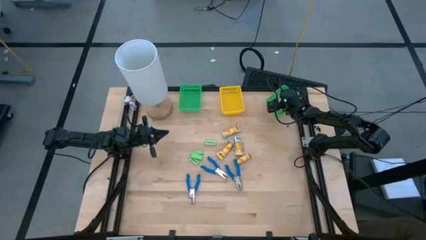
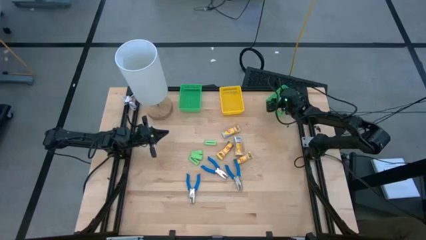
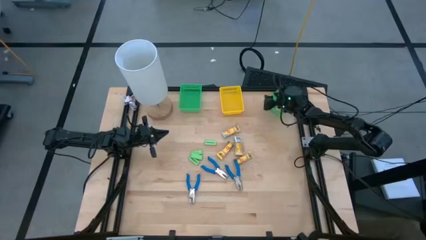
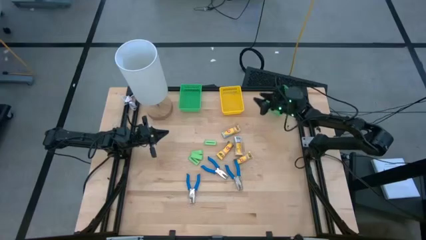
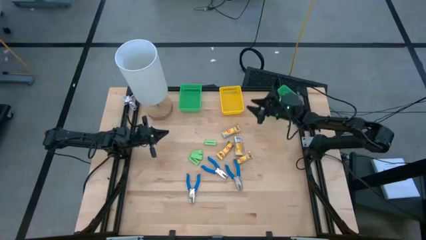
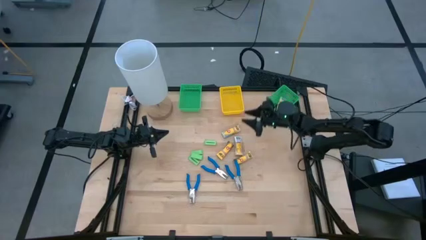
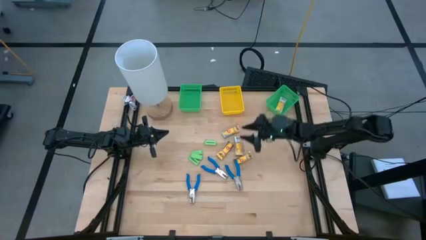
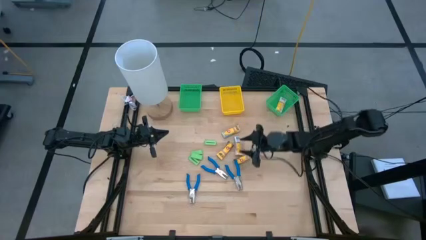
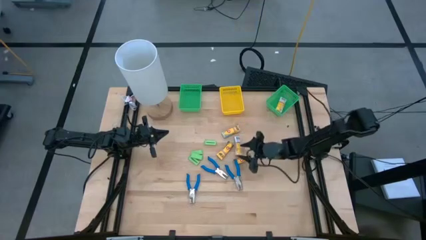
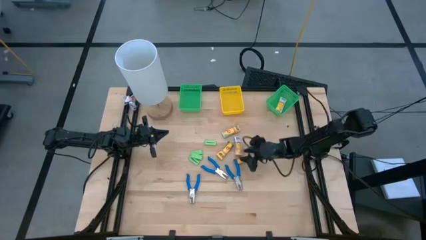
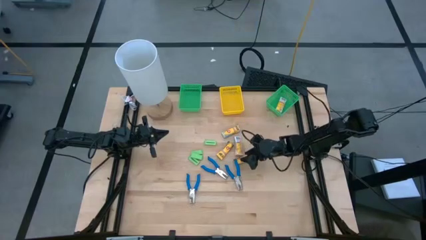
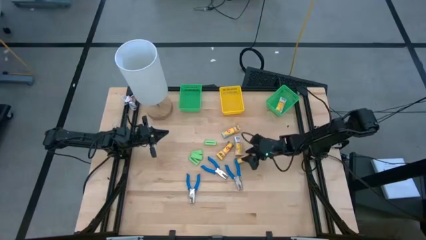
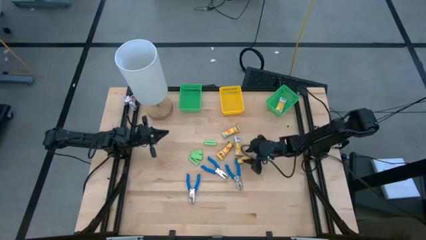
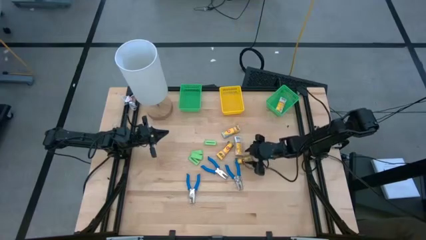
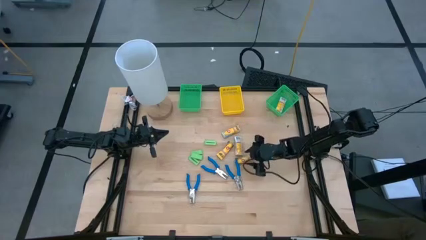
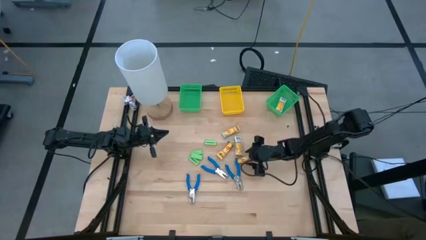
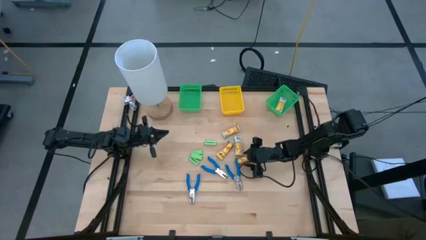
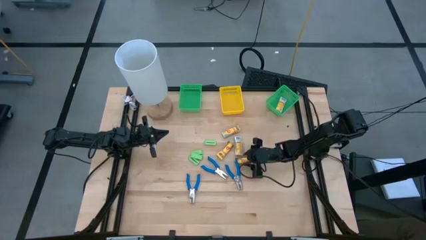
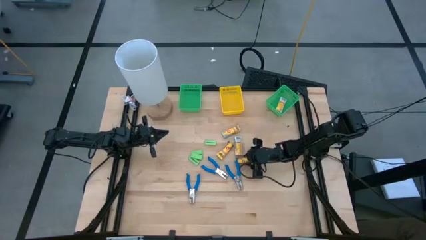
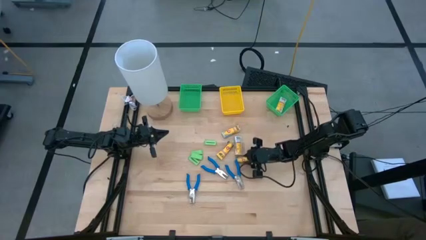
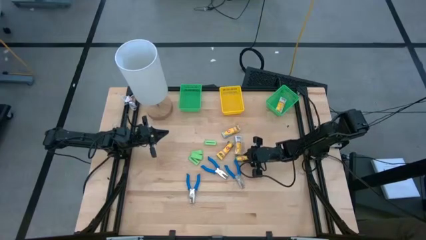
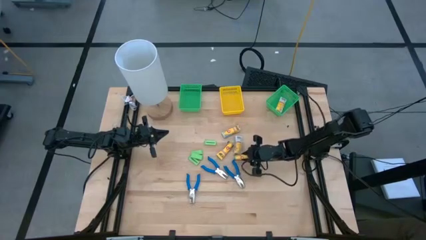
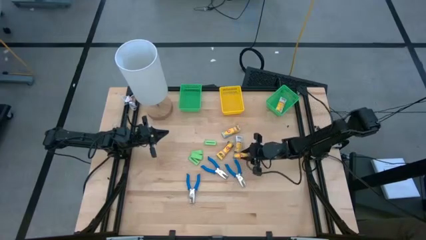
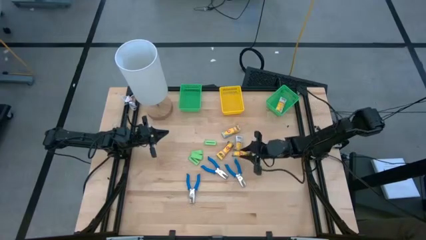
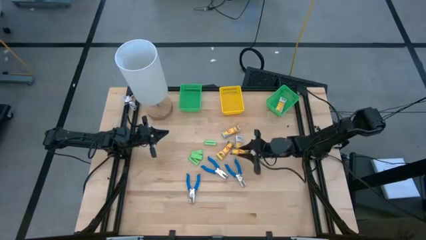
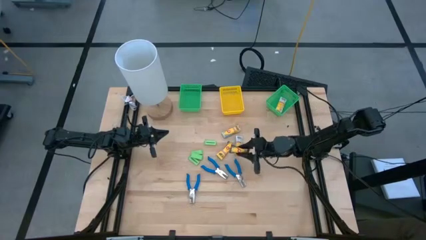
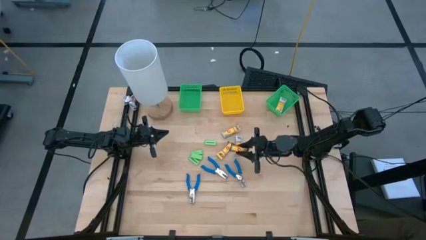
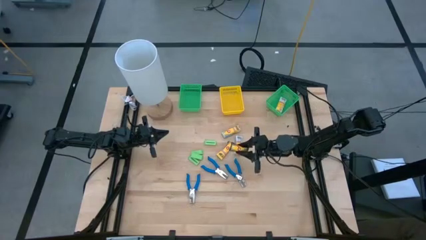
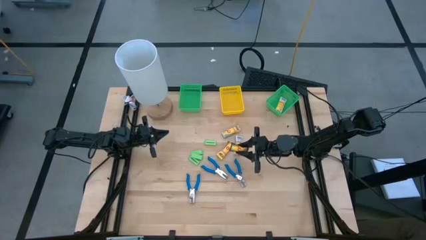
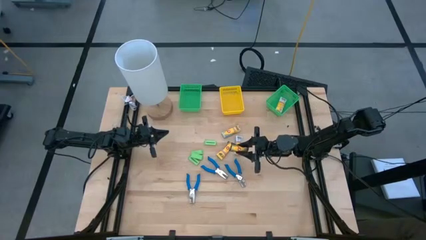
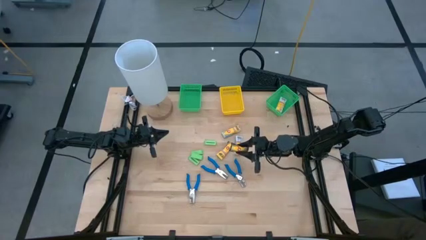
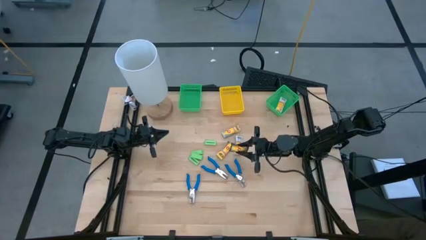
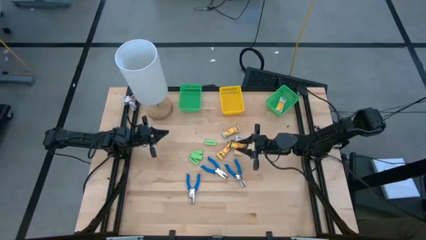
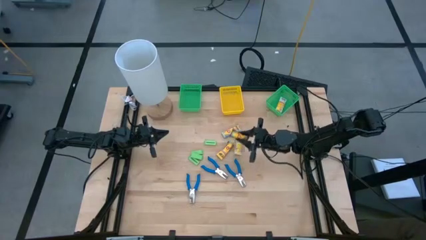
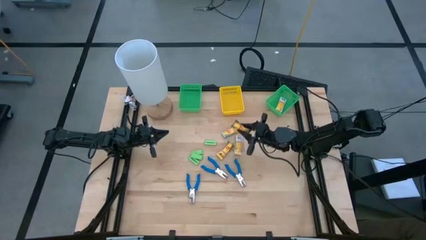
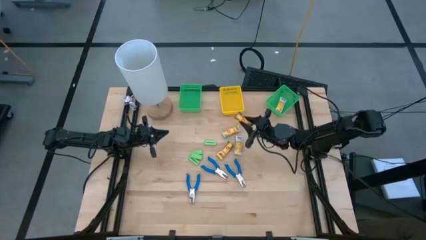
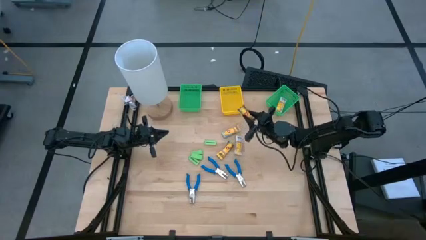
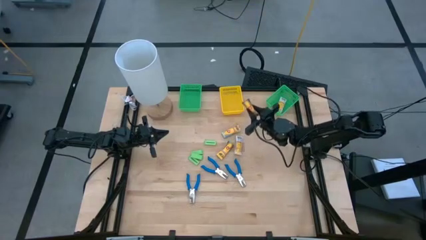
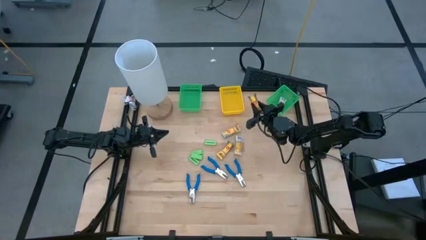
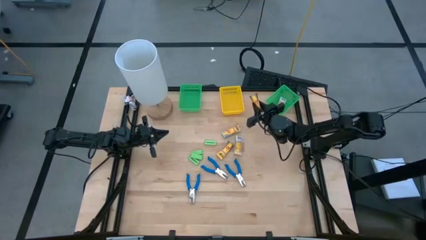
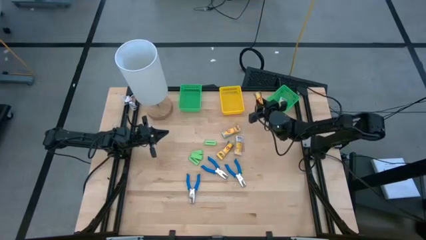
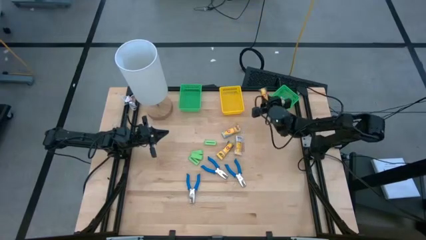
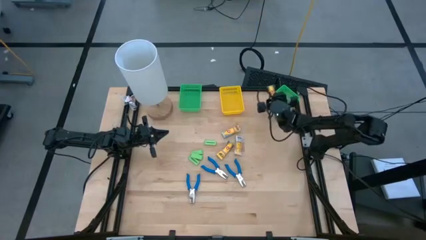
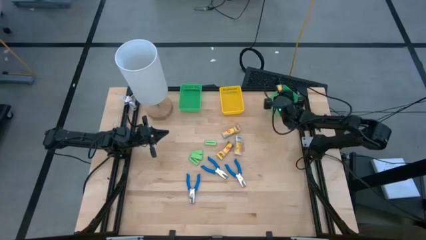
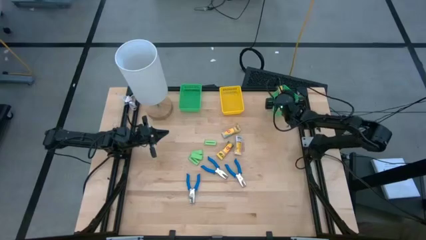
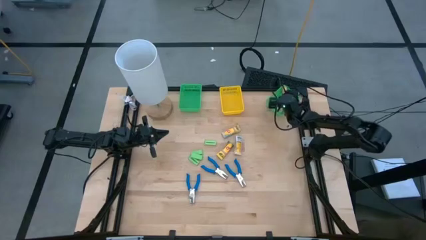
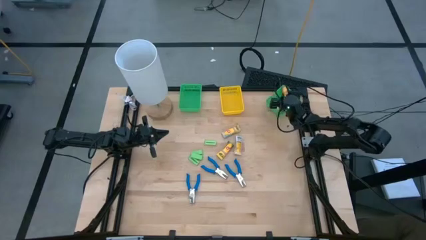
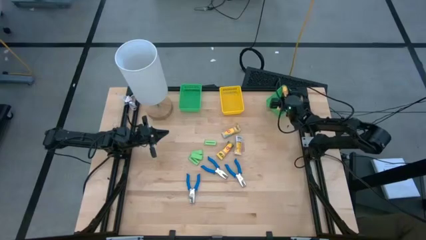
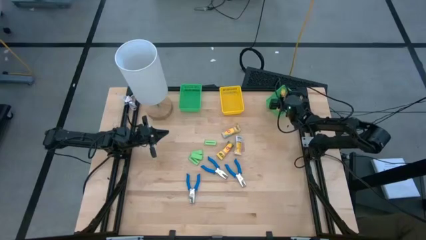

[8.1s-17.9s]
Task: Pick & Place School Supplies
Put the yellow crayon box into the right green bin

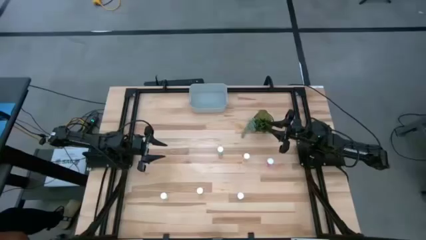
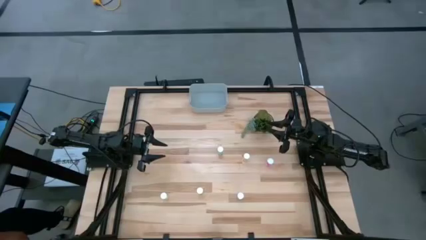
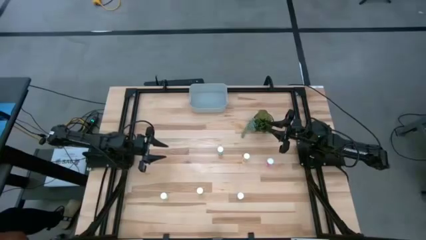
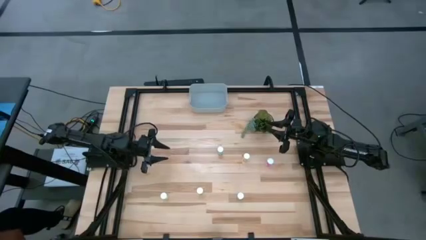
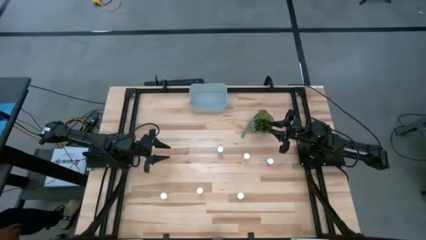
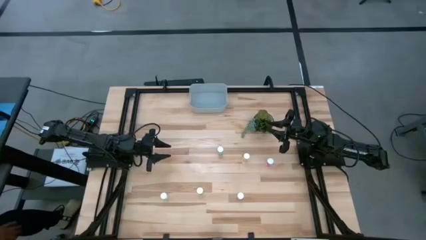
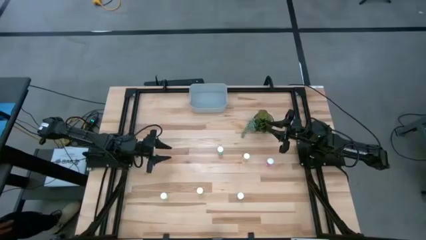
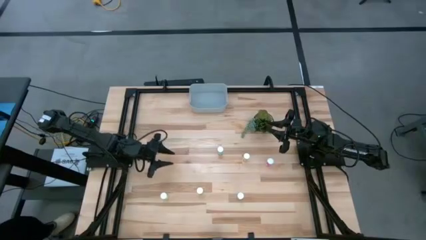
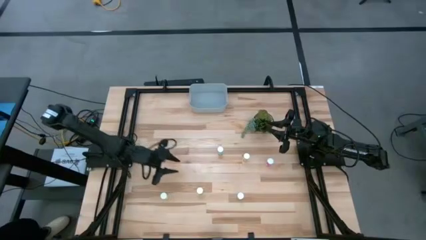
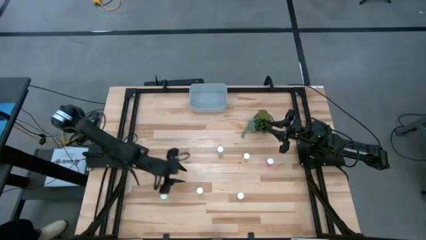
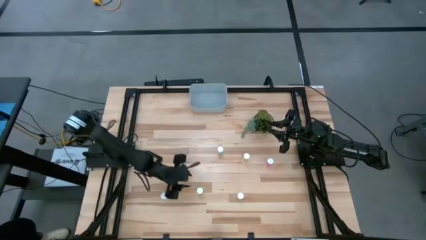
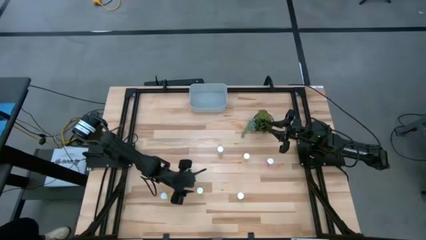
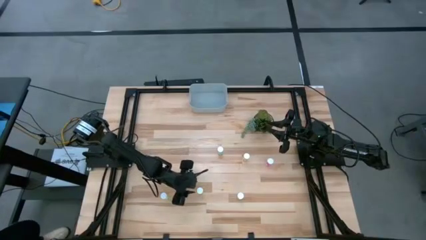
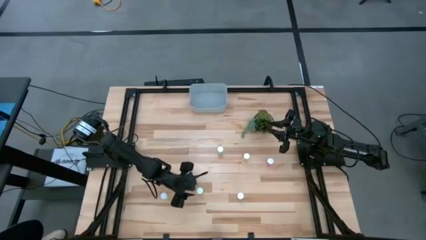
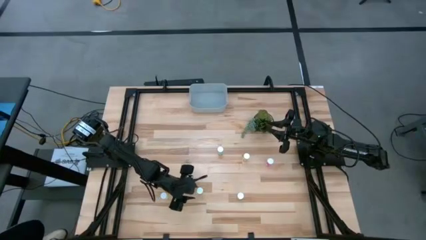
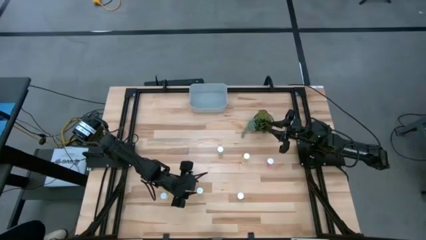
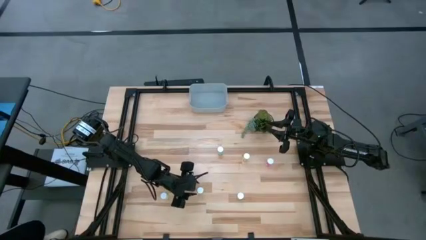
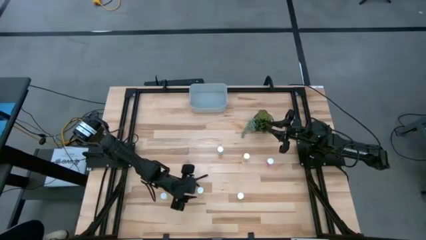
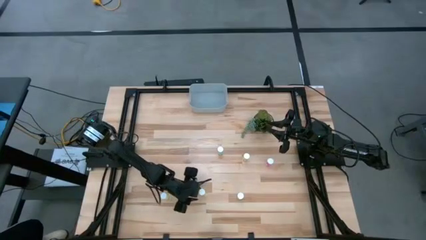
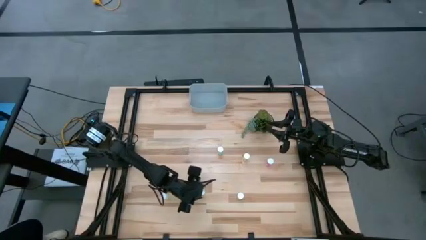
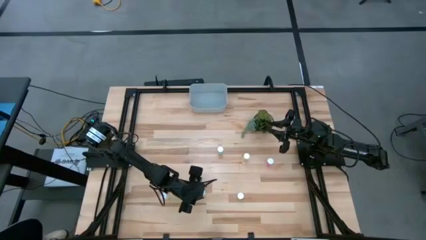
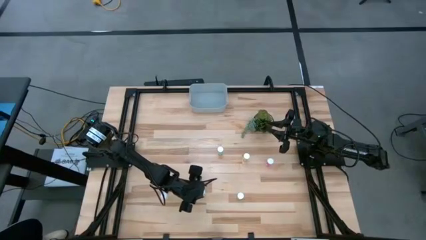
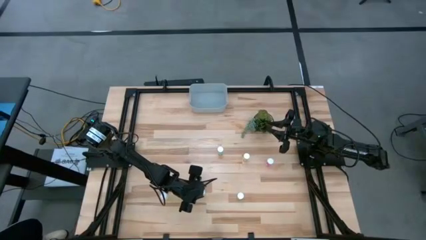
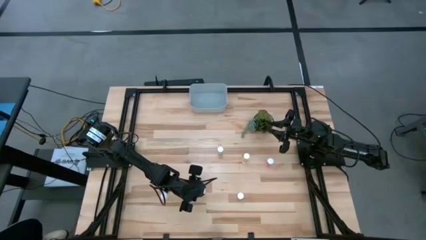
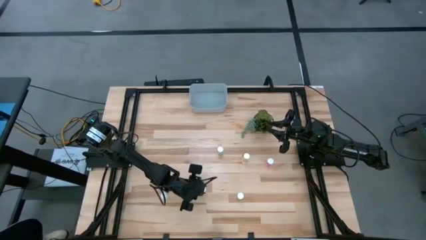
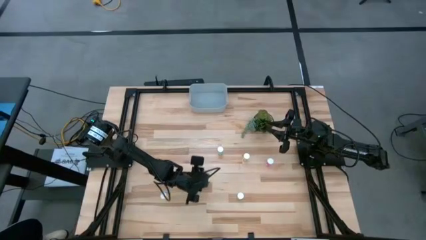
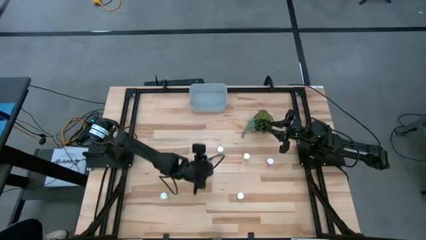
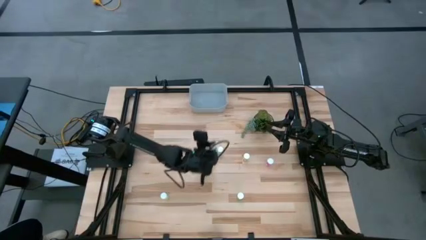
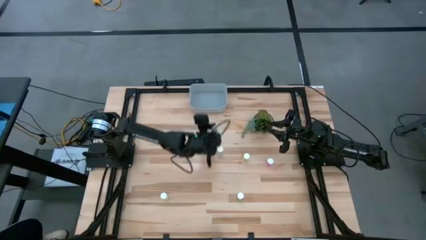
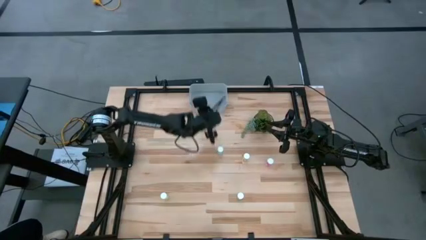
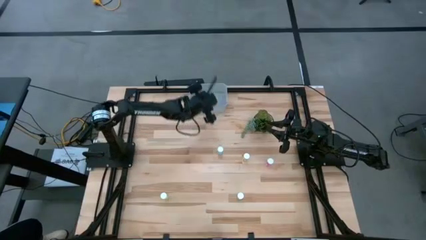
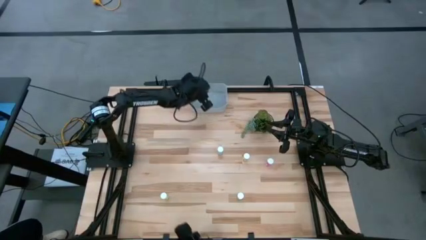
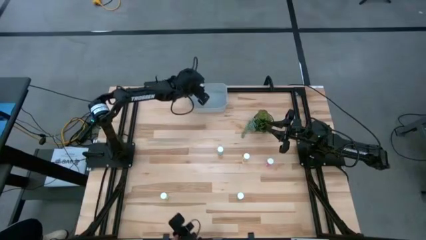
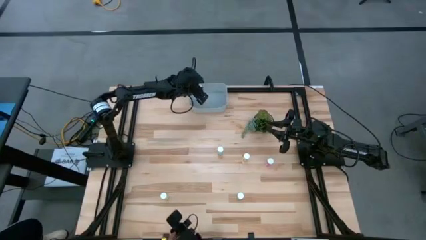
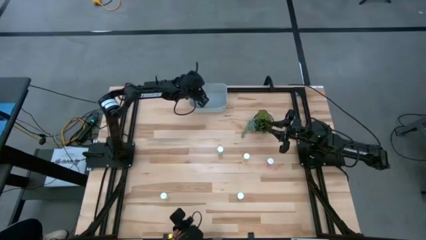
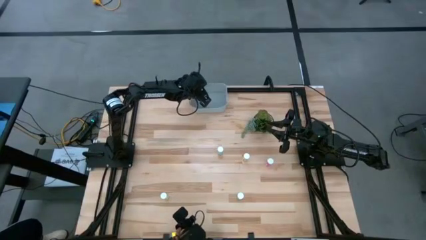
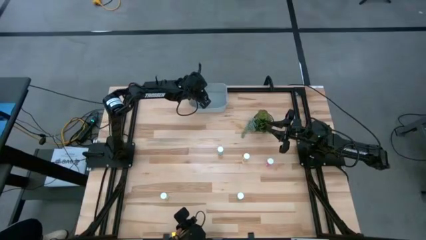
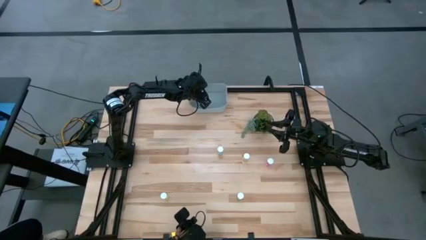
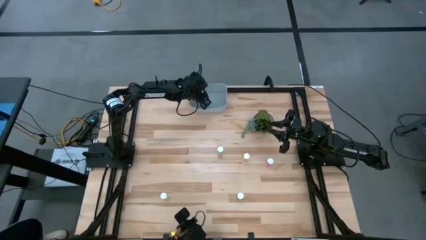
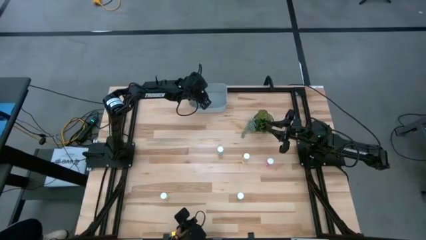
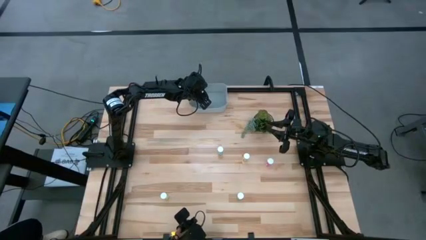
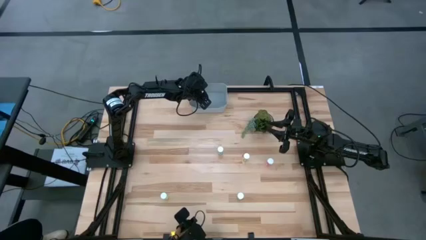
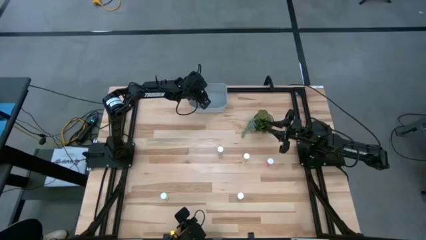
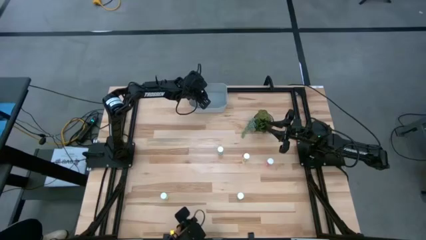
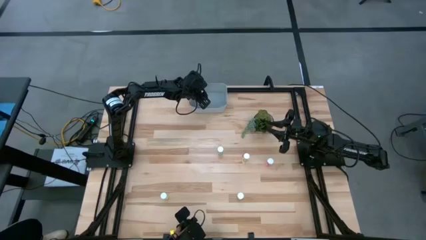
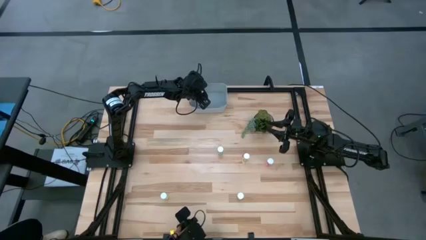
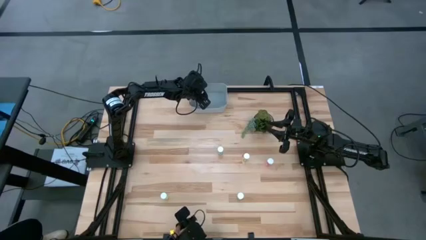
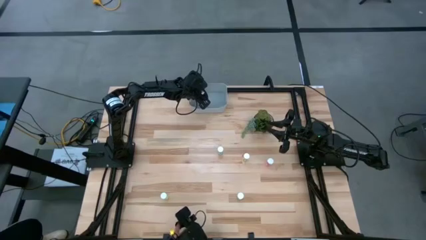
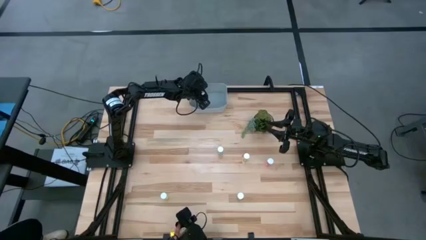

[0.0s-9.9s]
Task: Pick and place pill bottles into a basket
Put the middle yellow medicine bottle in the gray bin
